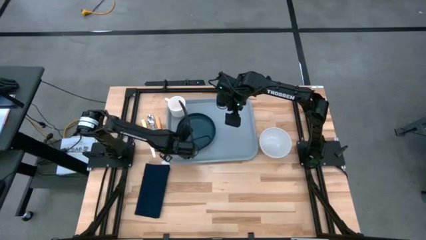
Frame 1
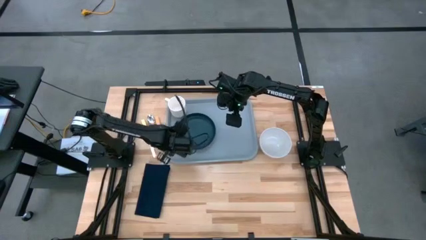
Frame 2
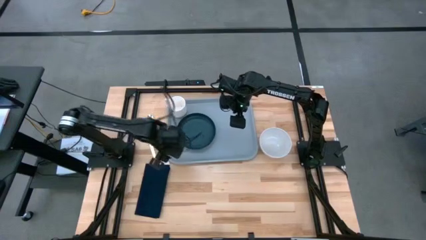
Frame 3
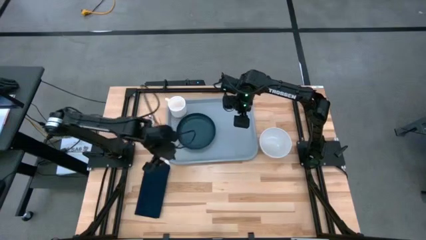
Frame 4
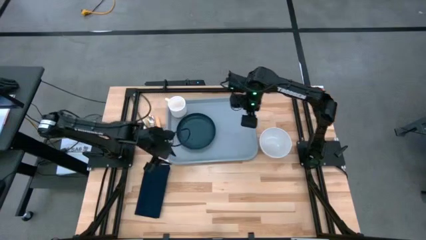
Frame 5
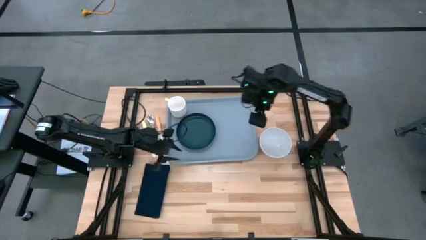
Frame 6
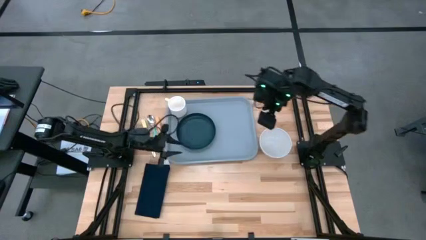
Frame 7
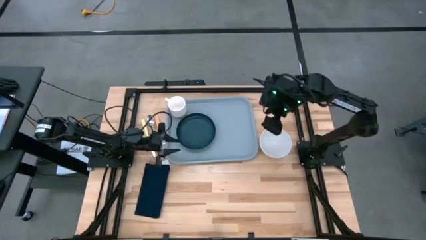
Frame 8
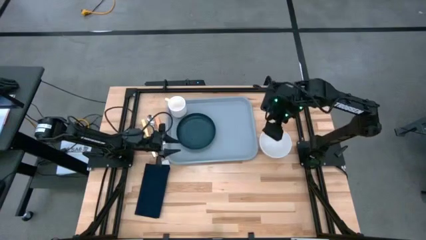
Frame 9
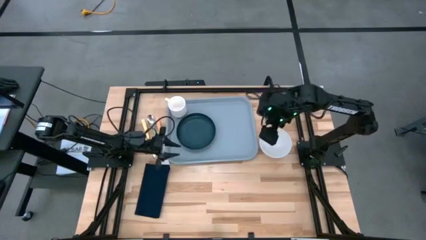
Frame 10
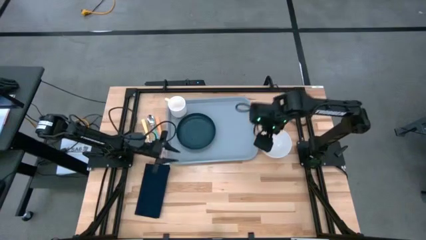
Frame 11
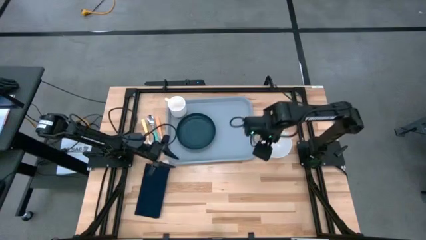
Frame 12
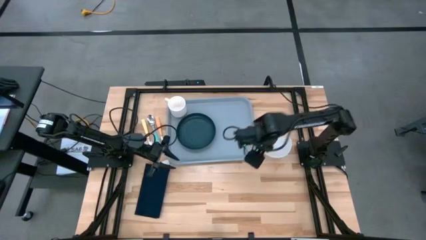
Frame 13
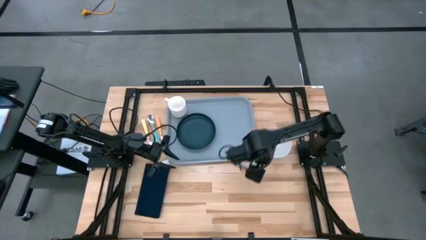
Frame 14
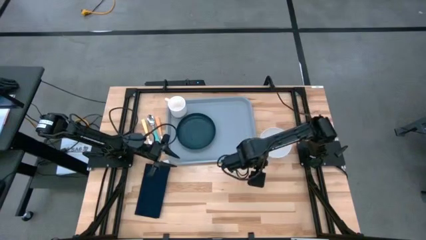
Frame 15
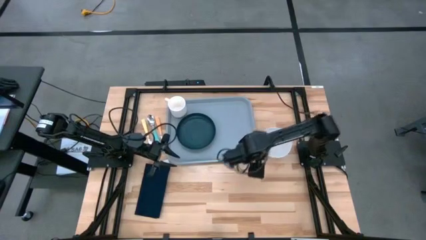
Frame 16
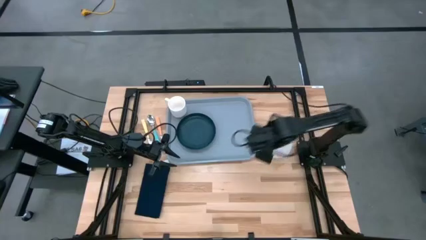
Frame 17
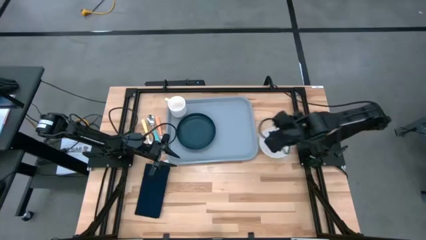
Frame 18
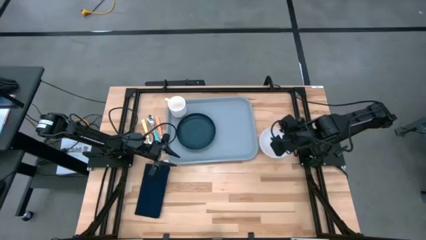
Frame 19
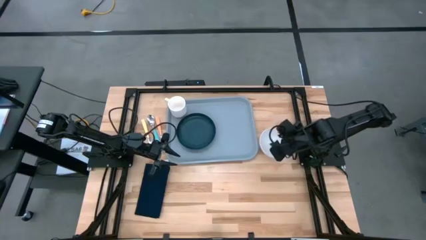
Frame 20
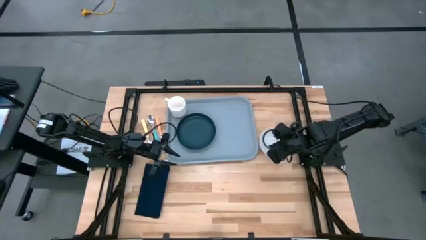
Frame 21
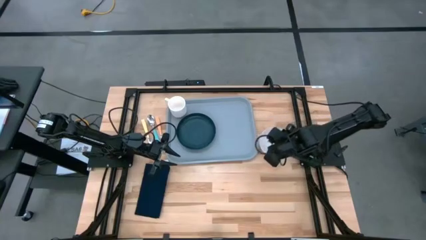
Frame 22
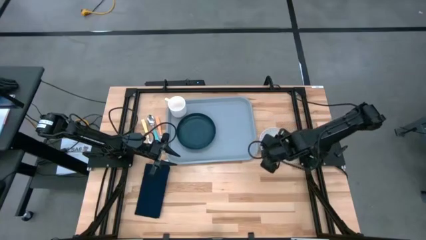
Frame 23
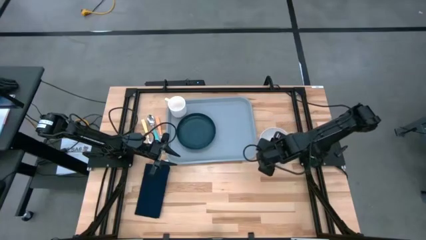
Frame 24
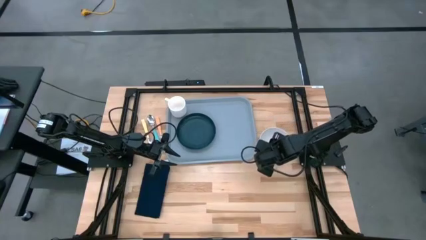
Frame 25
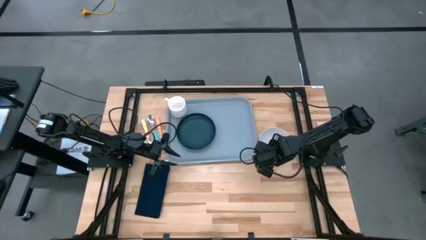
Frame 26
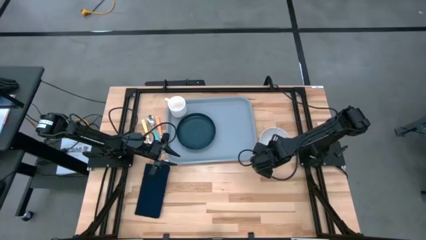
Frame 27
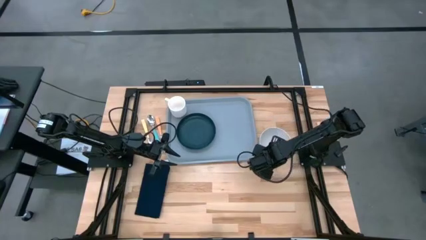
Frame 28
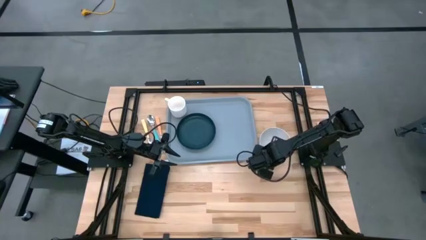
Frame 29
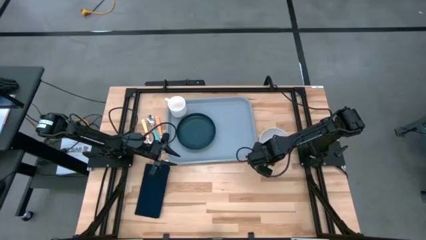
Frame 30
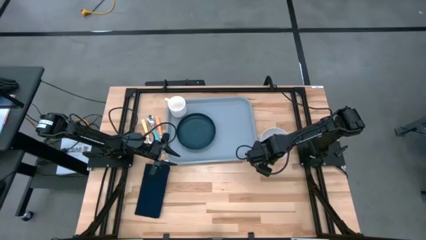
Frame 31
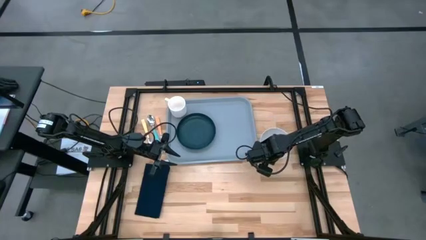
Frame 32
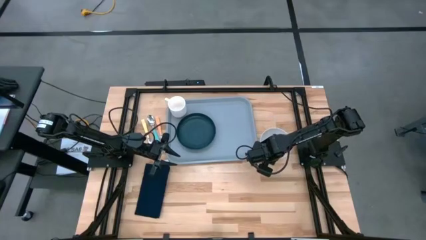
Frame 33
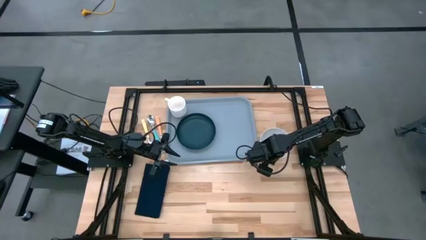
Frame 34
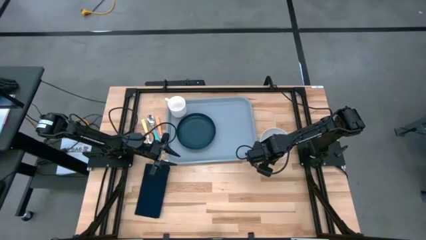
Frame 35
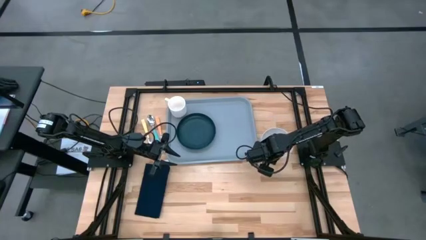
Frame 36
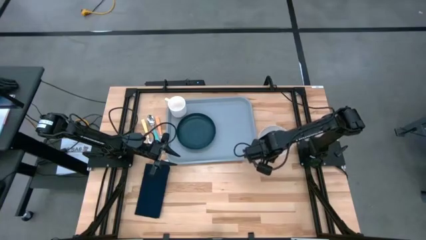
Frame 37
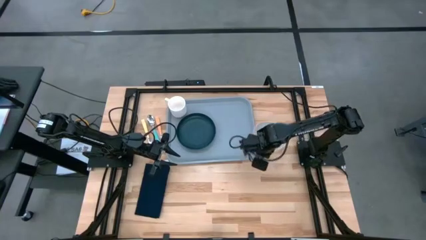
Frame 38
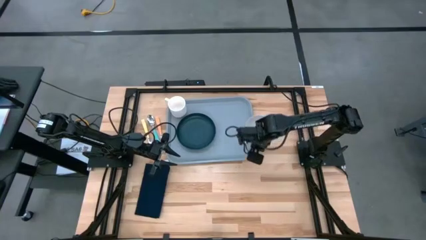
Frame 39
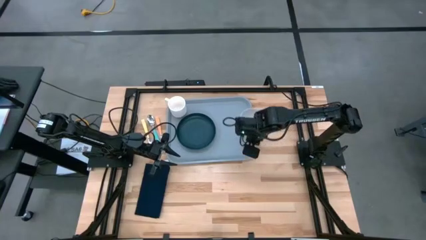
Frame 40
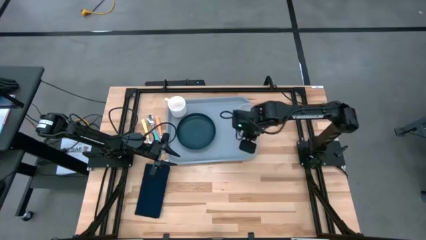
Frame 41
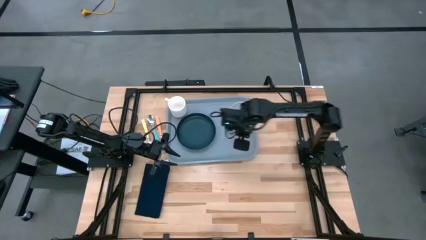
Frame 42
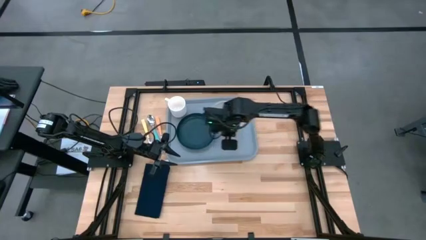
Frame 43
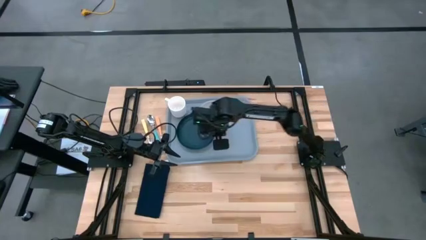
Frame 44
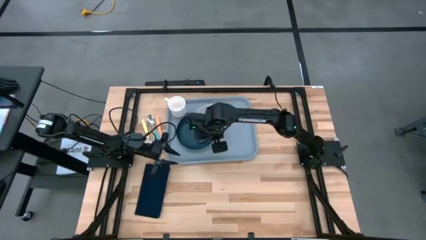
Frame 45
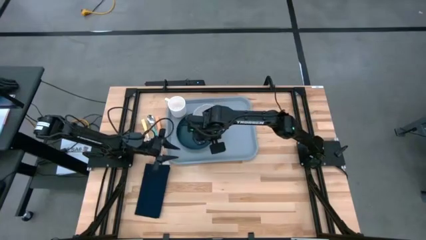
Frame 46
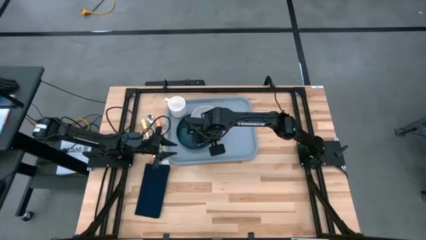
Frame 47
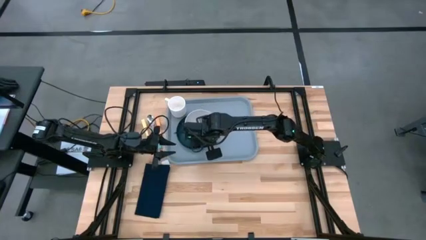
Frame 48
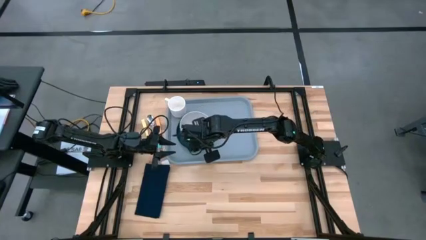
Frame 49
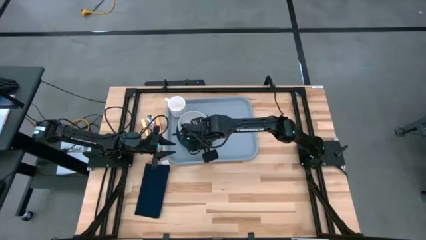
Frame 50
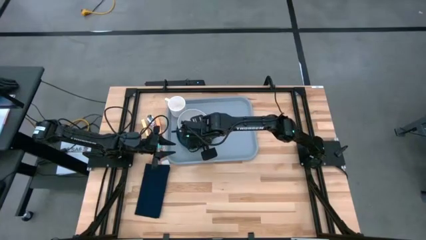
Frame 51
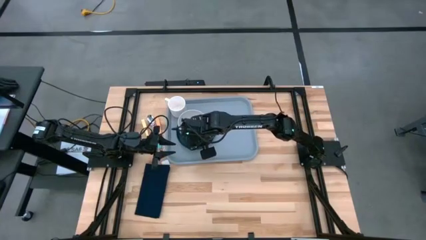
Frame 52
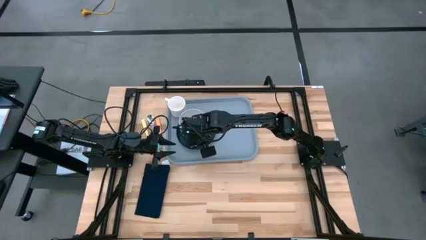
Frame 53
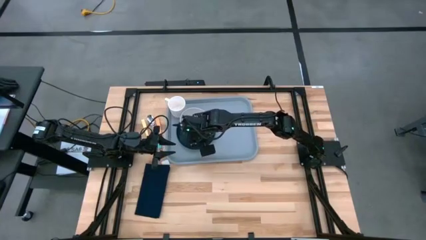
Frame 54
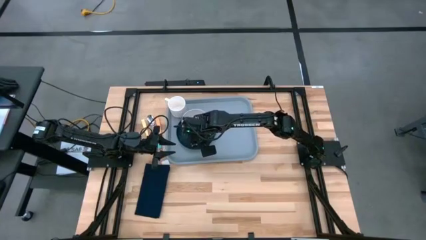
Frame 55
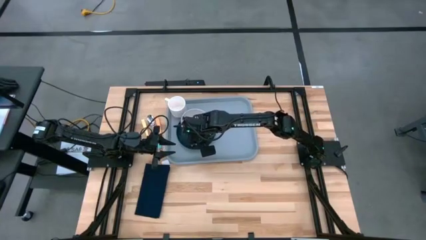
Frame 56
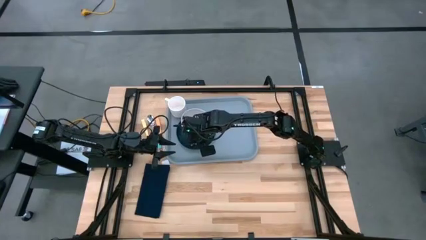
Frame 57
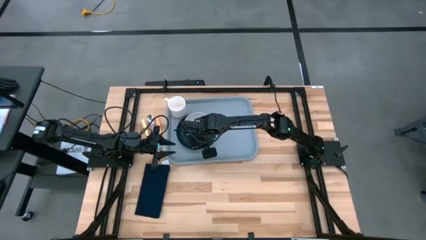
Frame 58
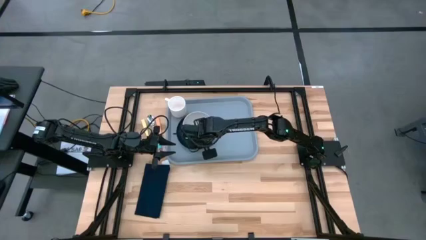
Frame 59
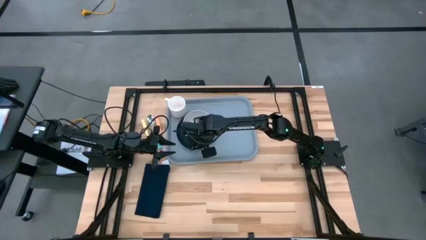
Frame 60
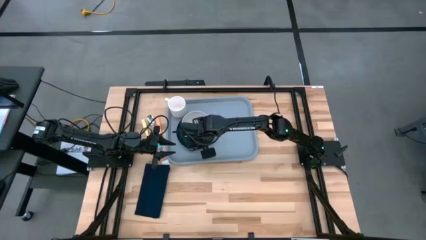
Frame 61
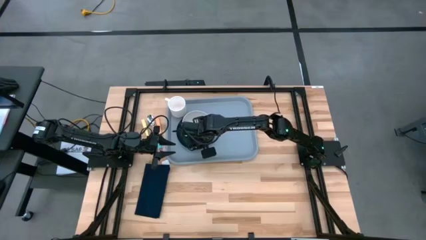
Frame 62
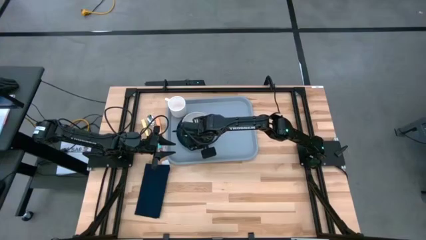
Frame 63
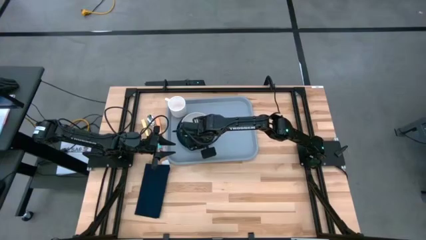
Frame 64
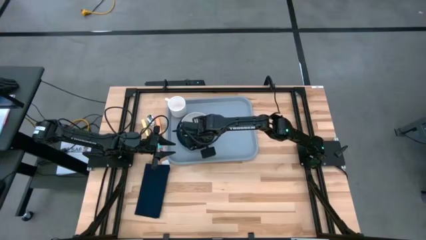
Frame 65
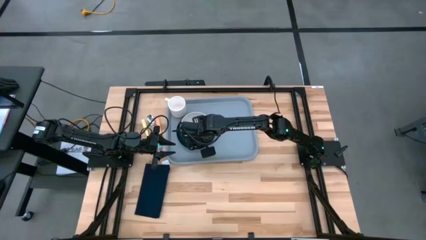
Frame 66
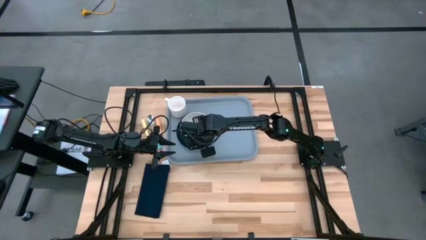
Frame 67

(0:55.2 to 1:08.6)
Task: Set up tray
Put the white bowl on the black plate
